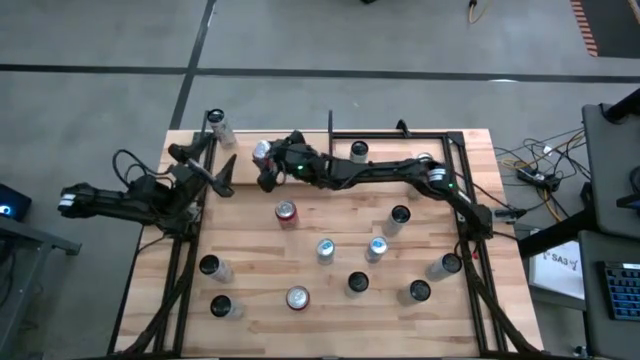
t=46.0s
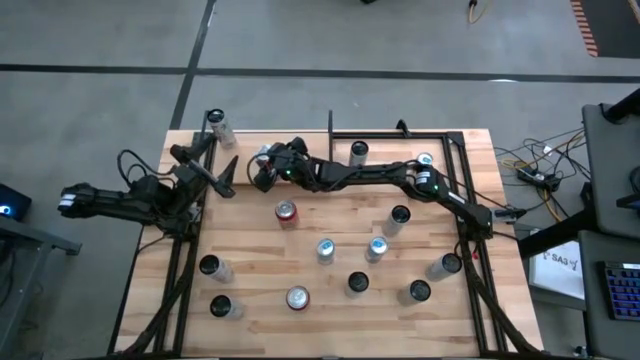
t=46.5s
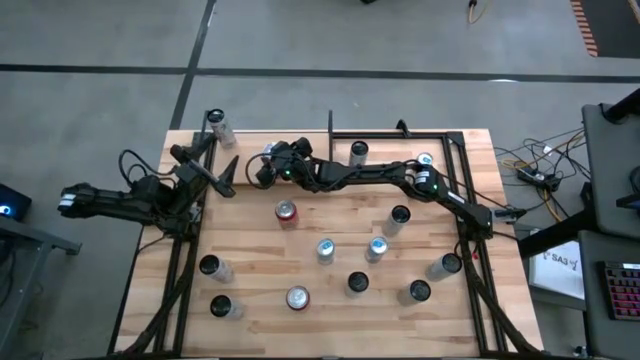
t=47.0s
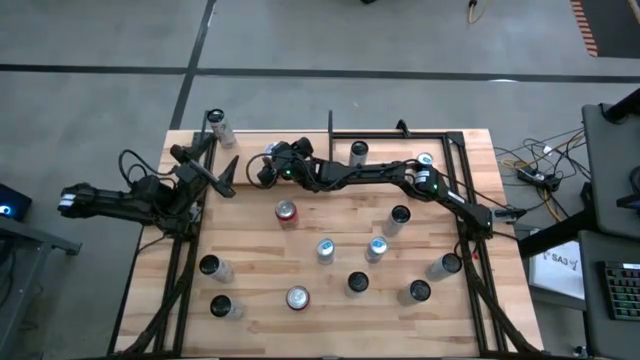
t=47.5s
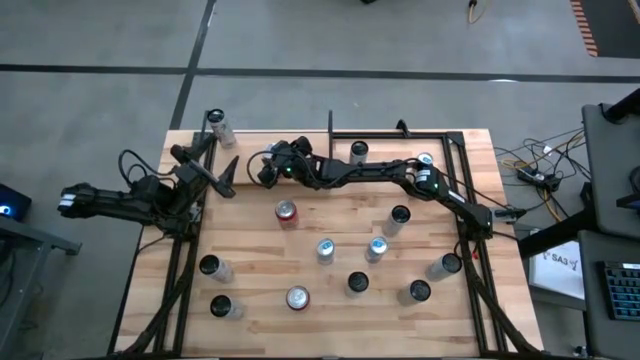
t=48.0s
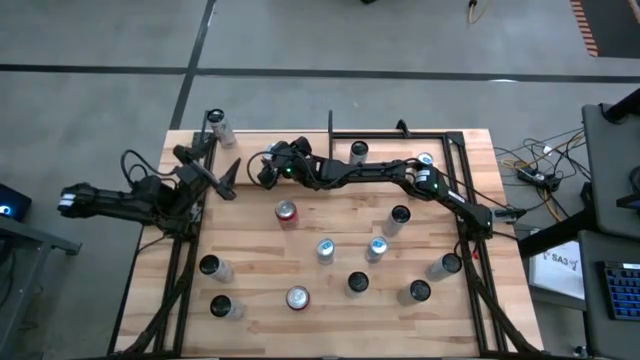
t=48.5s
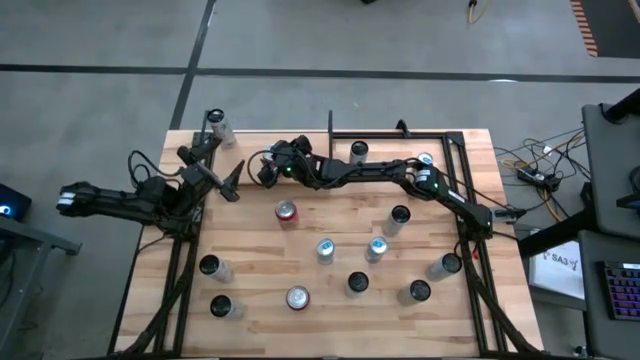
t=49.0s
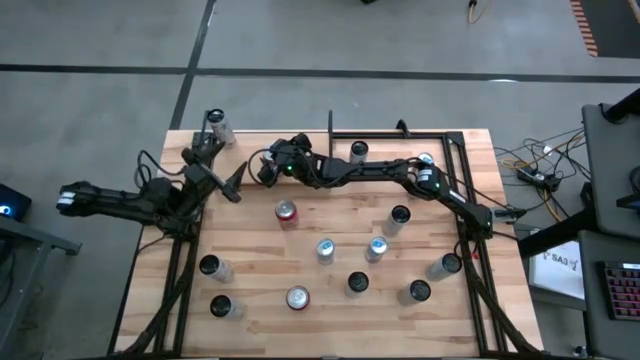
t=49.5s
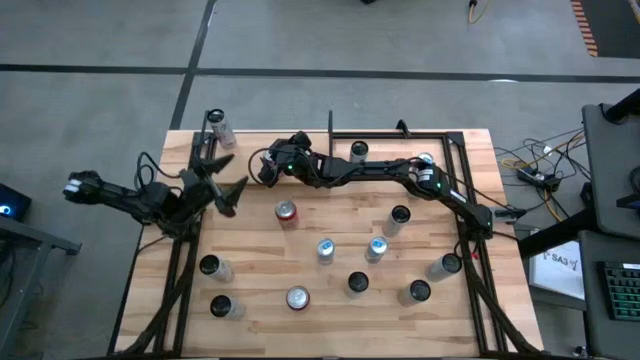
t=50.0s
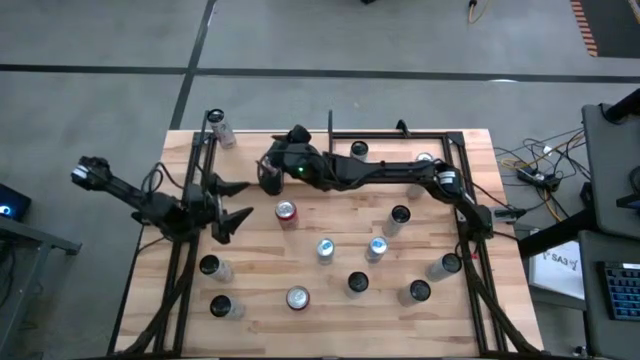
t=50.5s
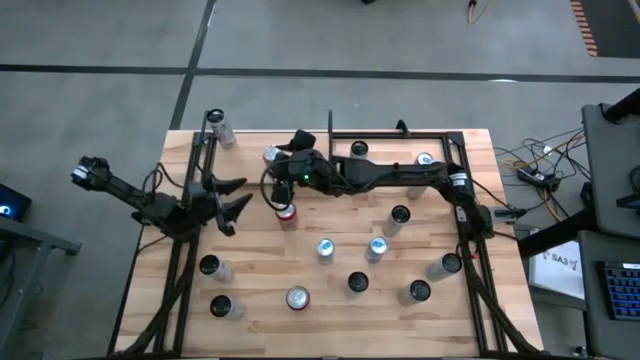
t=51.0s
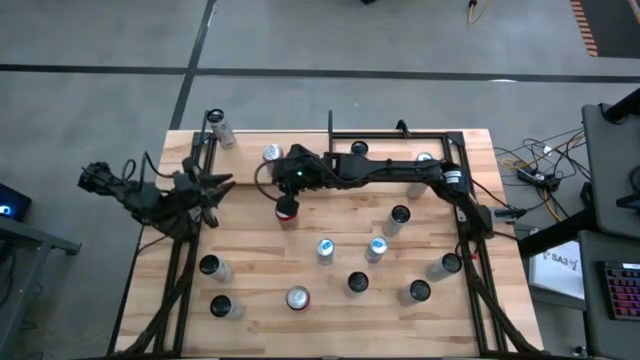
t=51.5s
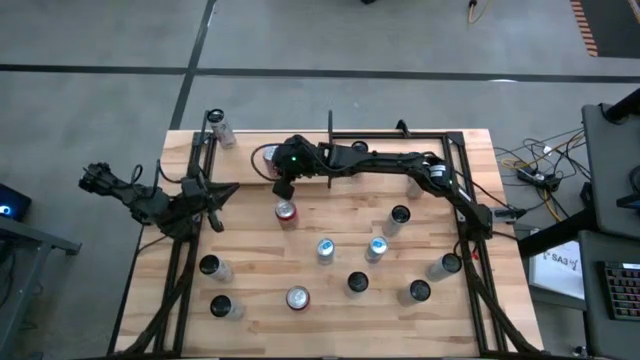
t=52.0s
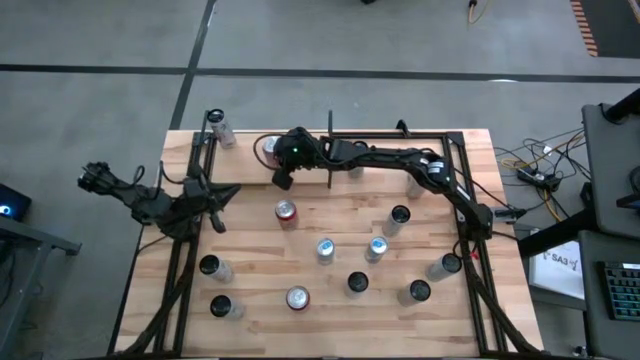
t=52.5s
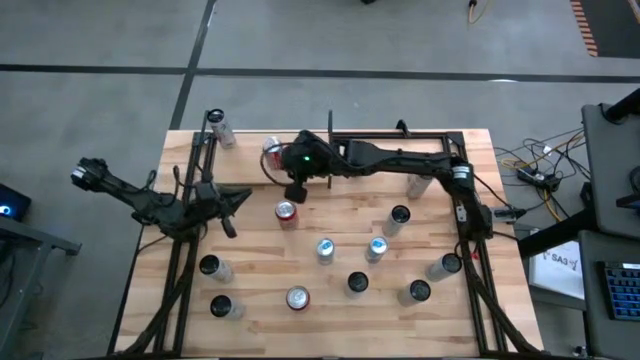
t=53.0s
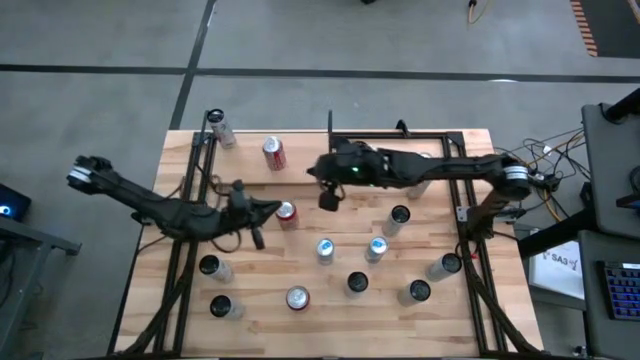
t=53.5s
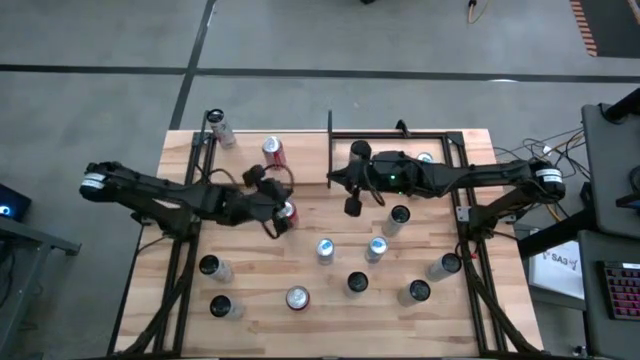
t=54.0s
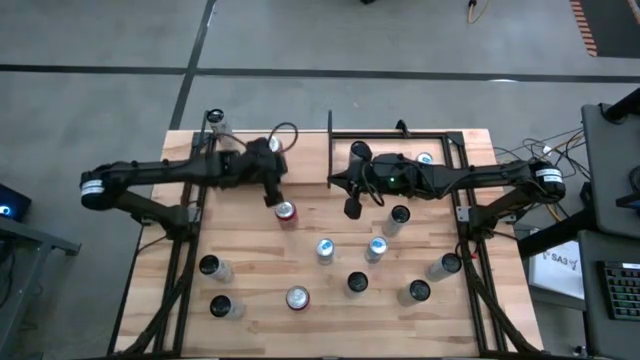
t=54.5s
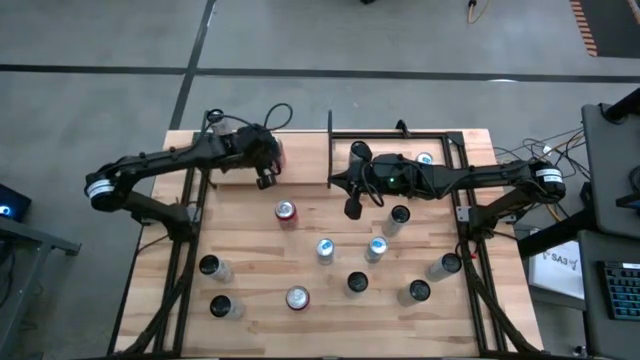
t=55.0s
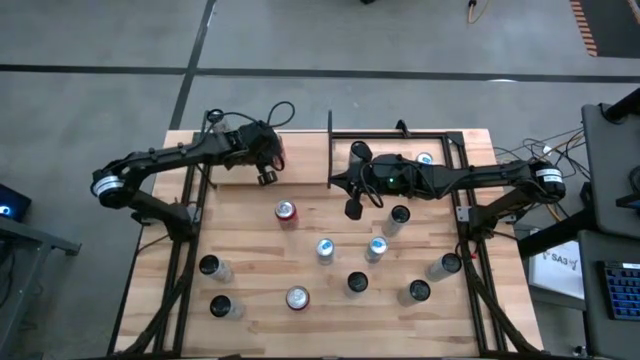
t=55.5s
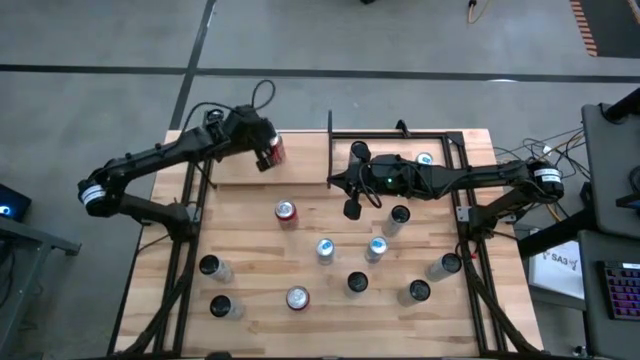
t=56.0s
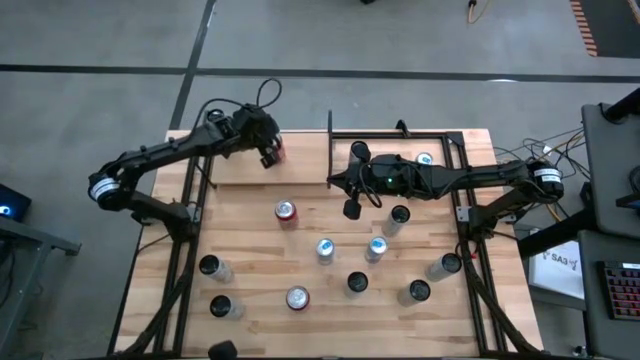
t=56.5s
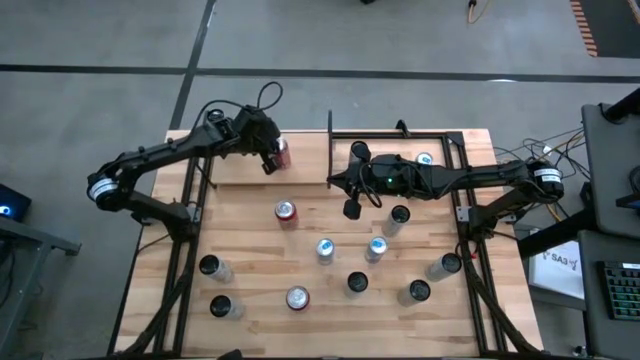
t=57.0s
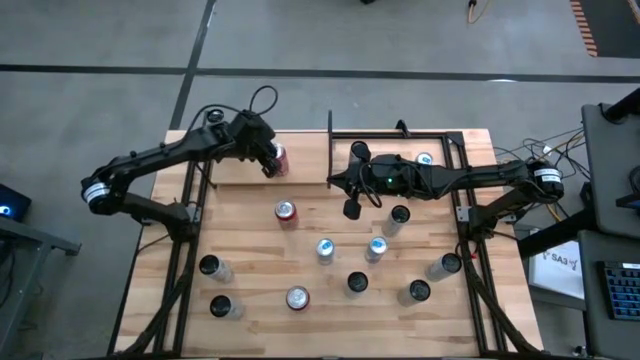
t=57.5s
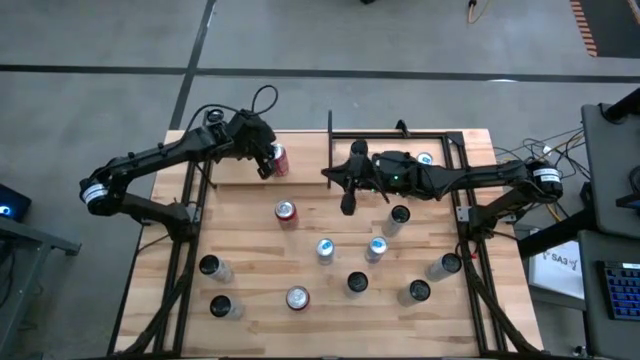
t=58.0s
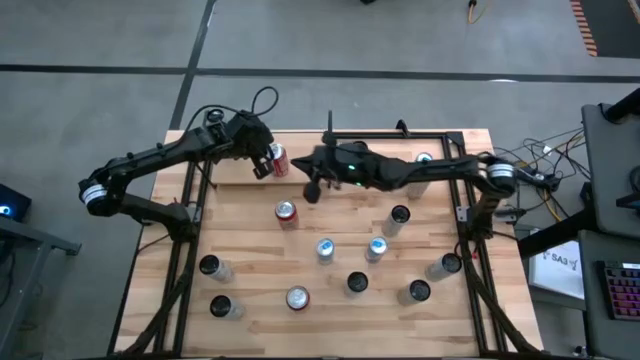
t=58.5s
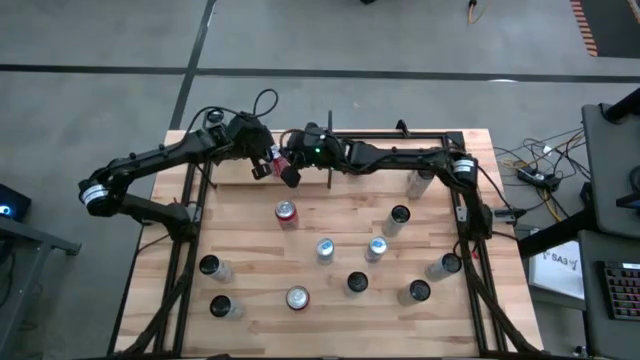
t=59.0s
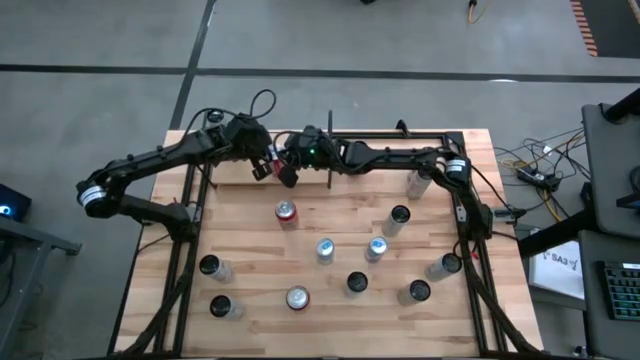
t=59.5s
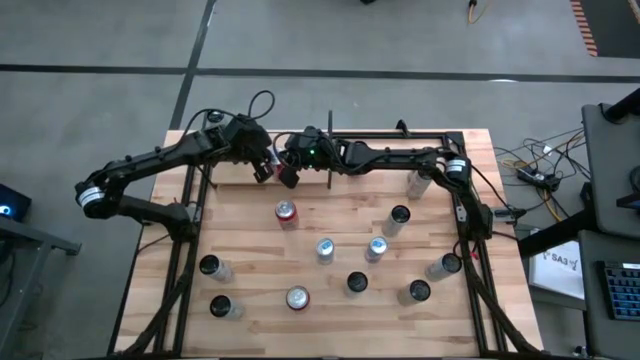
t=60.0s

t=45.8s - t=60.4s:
Task: Place canned beverage on shelf
Put the red and white soda can on the shelf

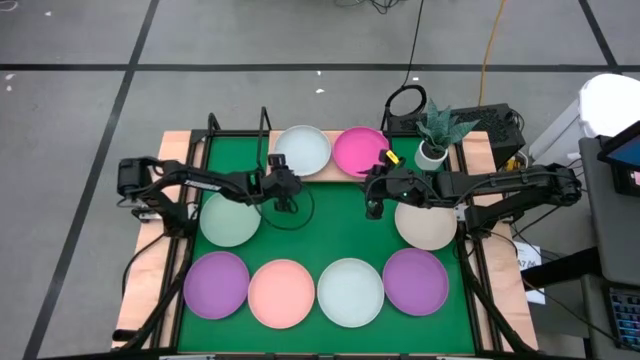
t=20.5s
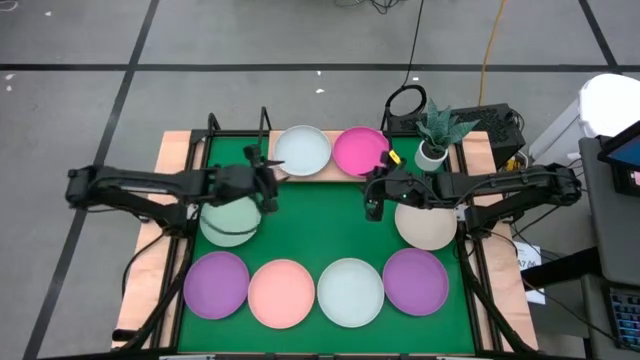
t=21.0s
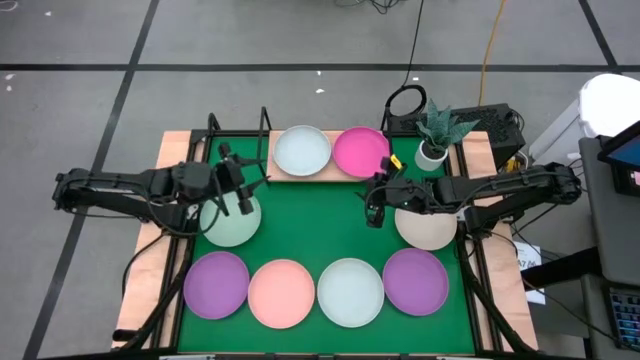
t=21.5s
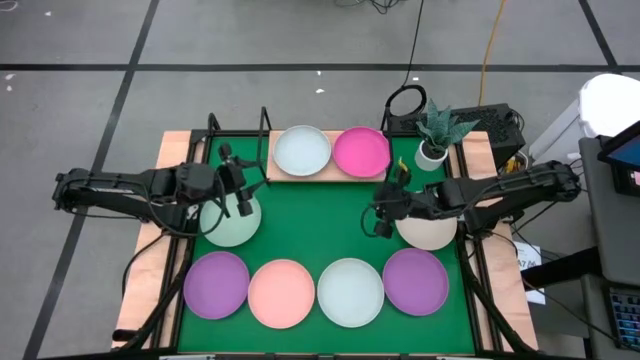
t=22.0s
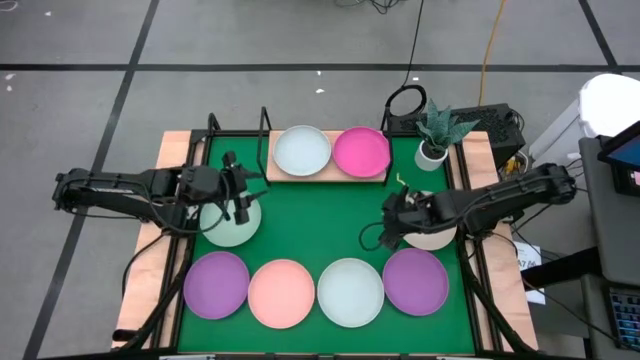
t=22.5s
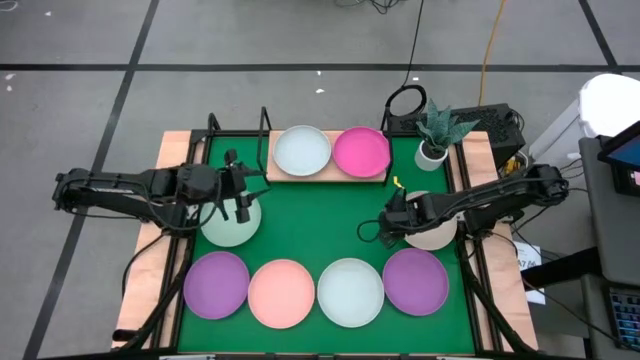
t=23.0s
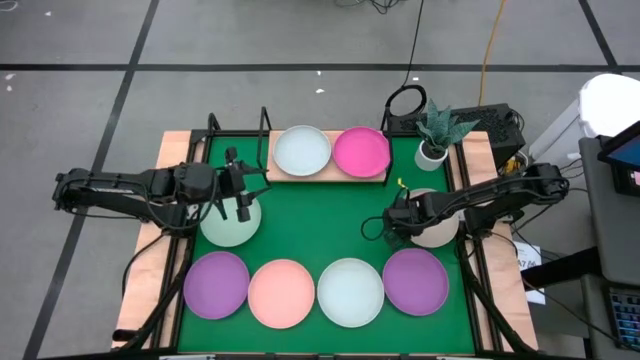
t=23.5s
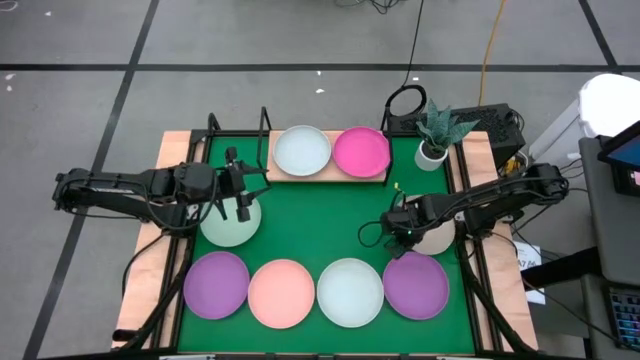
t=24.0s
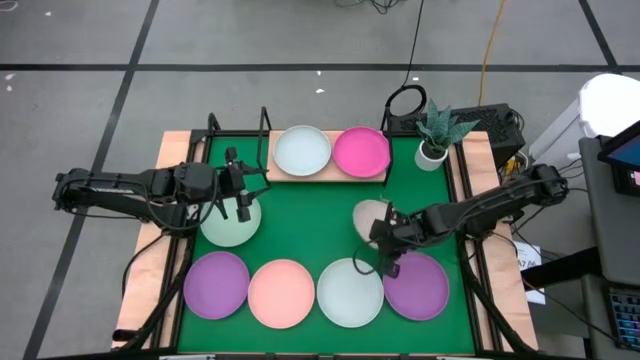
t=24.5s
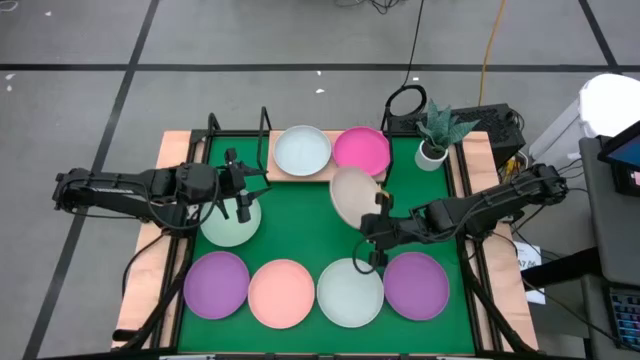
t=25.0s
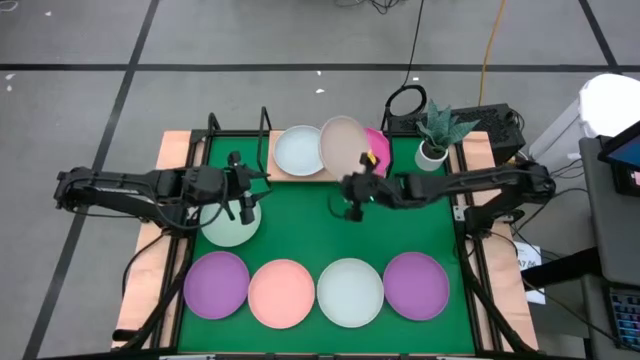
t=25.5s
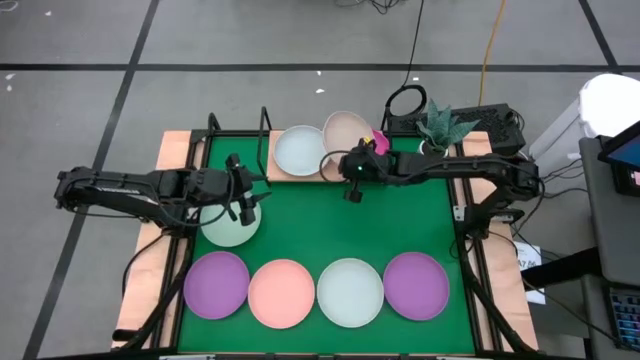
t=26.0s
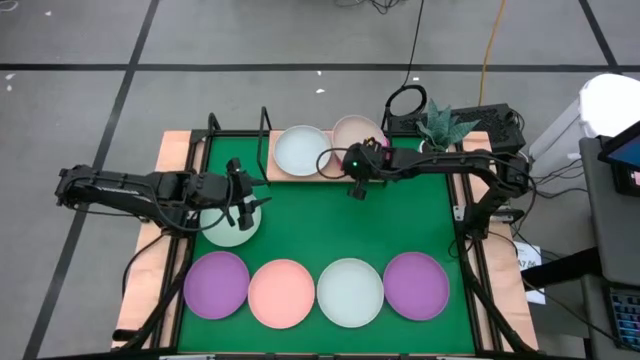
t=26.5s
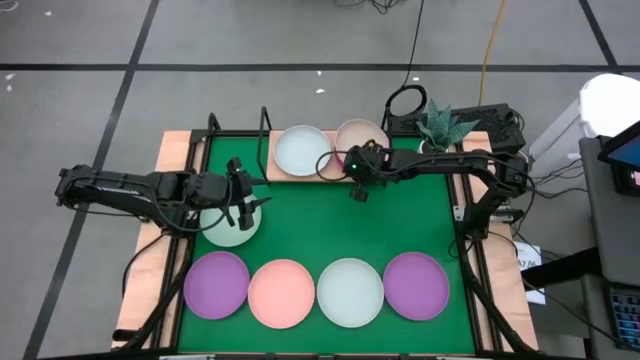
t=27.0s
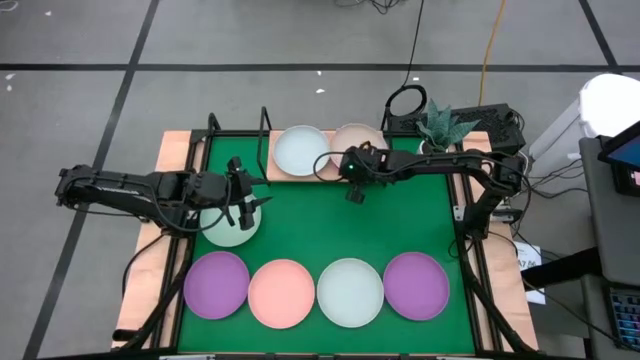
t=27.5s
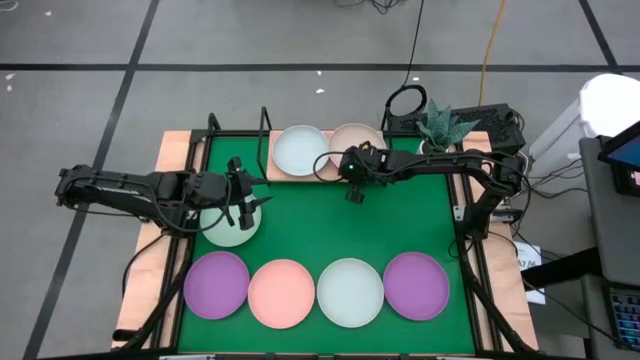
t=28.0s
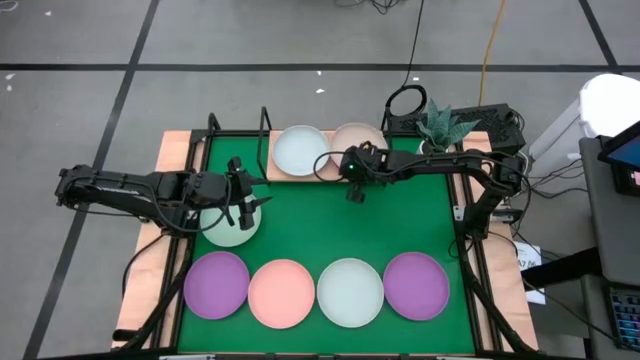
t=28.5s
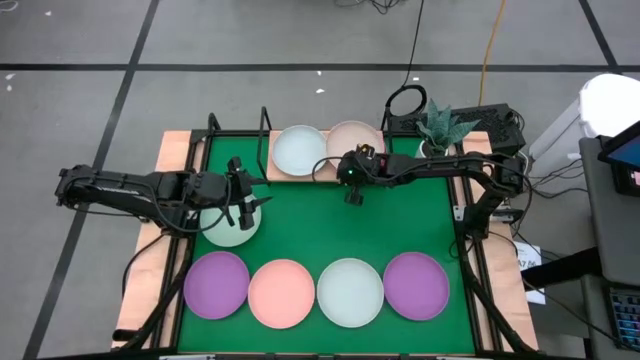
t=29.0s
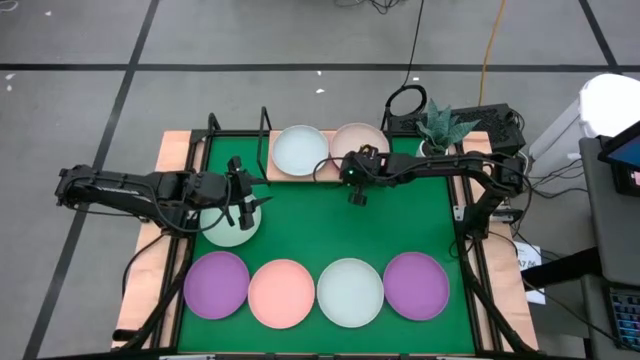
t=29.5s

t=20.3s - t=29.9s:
Task: Place and stack plates onto a shelf
Stack the light brown plate on top of the pink plate on the shelf
